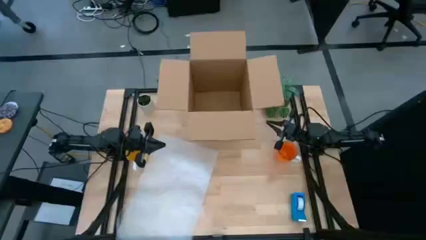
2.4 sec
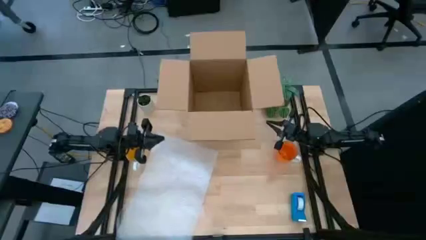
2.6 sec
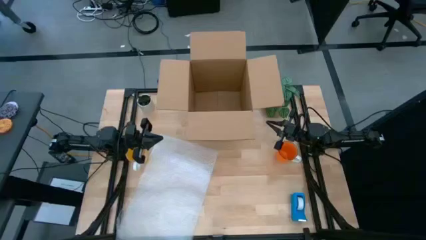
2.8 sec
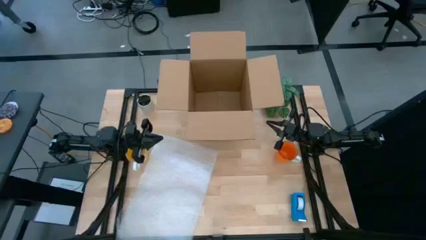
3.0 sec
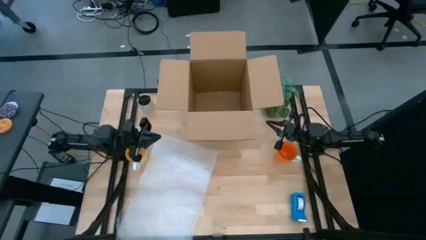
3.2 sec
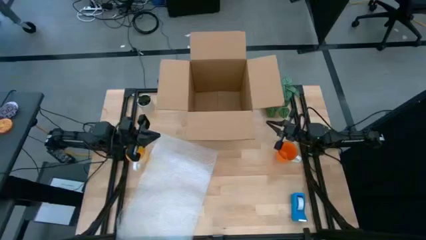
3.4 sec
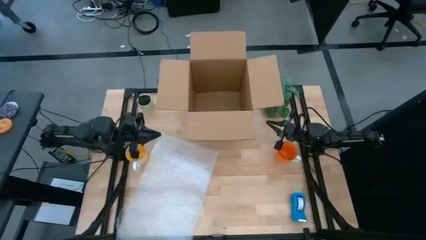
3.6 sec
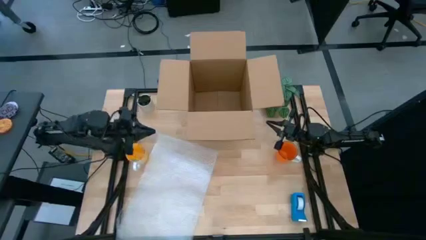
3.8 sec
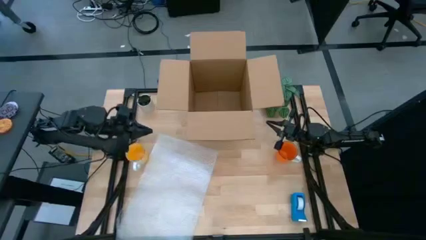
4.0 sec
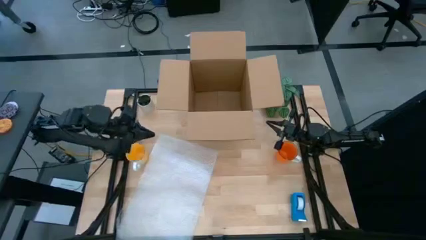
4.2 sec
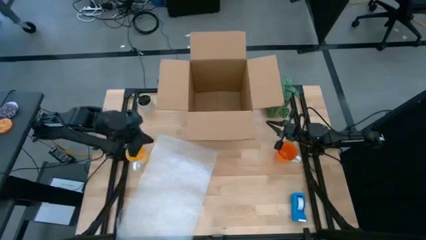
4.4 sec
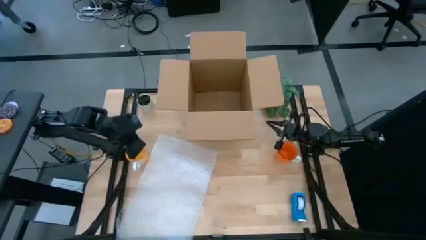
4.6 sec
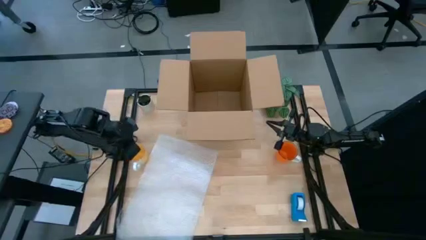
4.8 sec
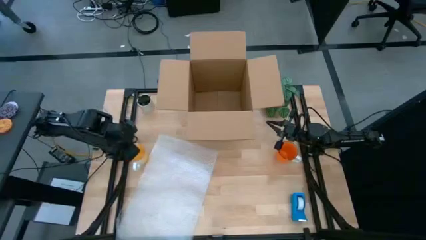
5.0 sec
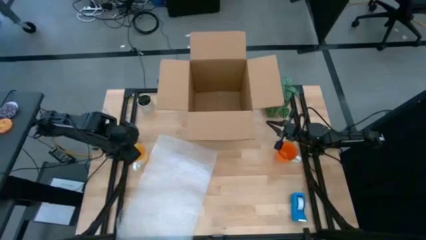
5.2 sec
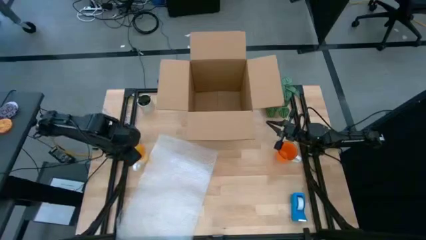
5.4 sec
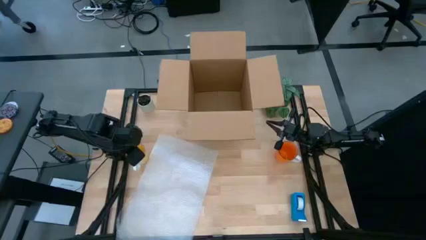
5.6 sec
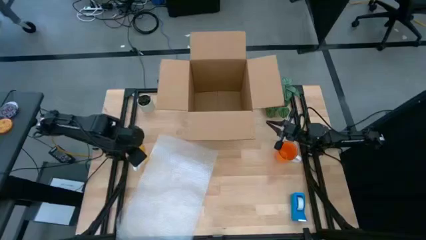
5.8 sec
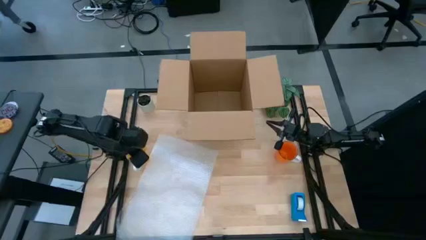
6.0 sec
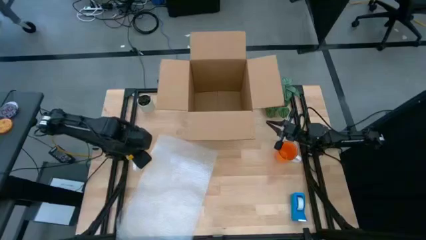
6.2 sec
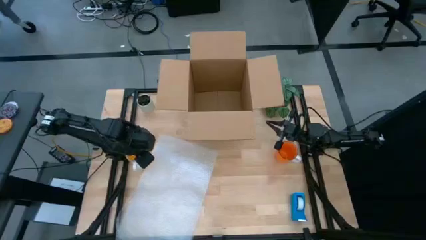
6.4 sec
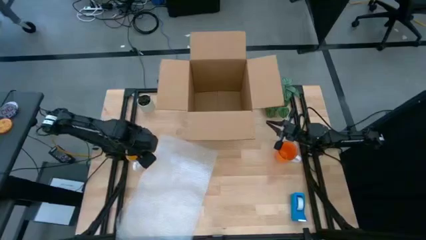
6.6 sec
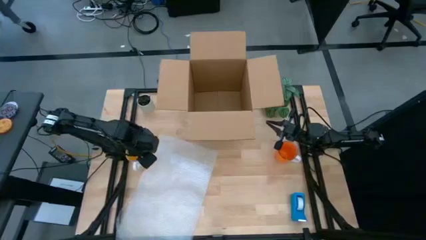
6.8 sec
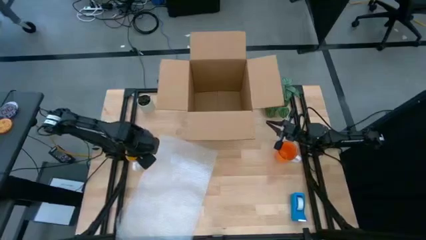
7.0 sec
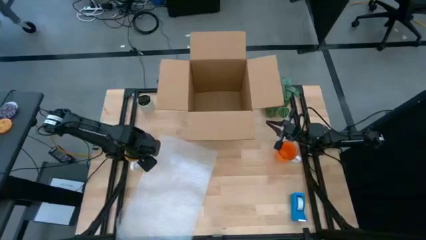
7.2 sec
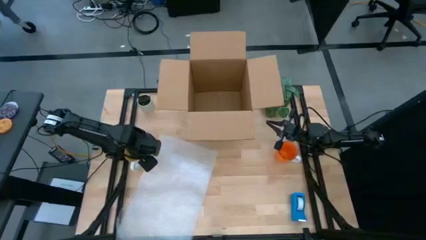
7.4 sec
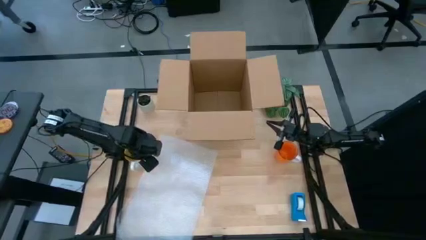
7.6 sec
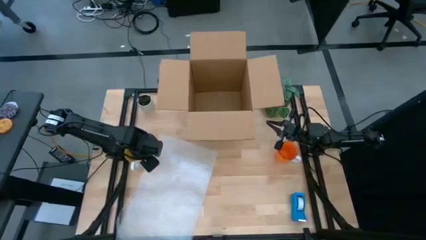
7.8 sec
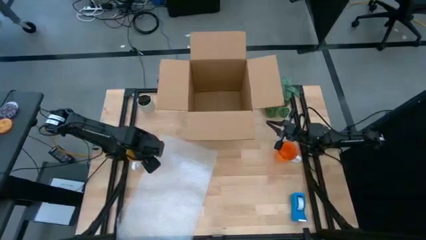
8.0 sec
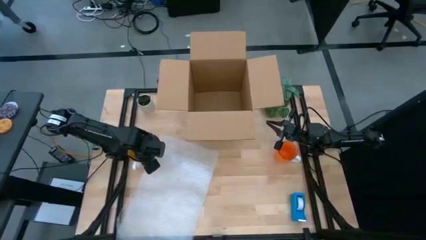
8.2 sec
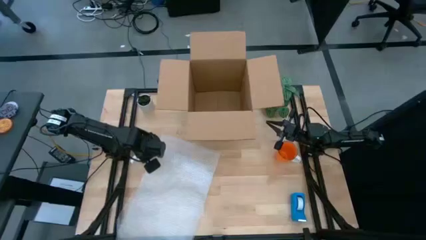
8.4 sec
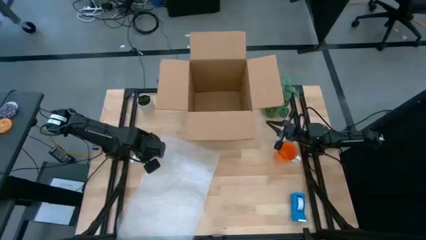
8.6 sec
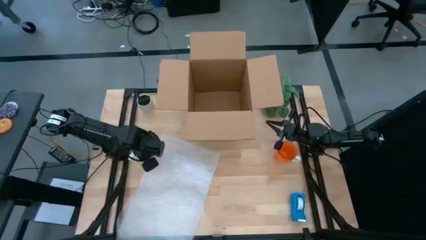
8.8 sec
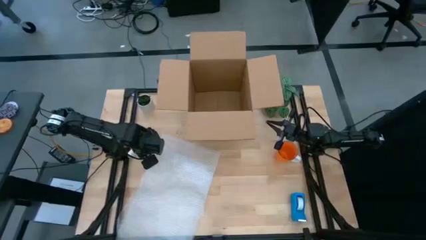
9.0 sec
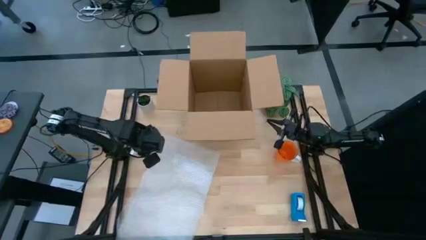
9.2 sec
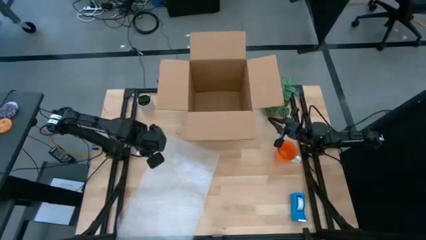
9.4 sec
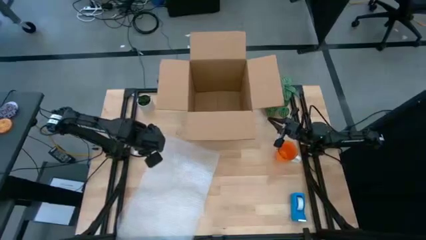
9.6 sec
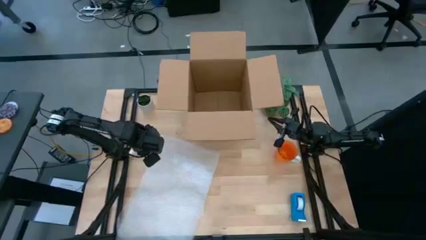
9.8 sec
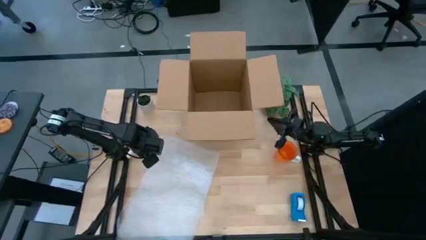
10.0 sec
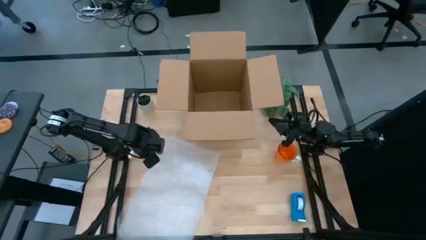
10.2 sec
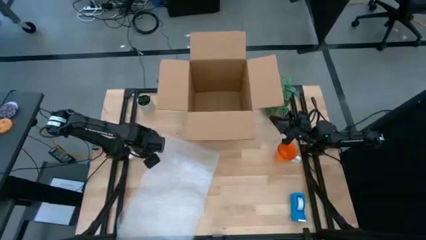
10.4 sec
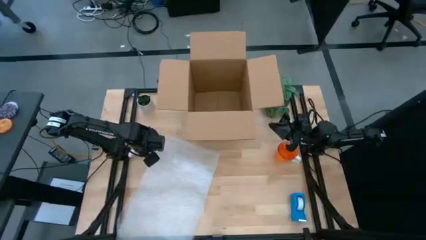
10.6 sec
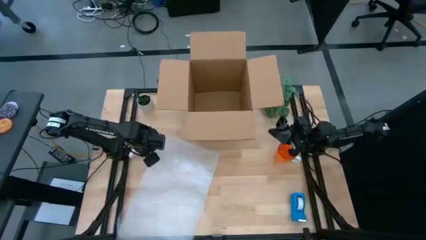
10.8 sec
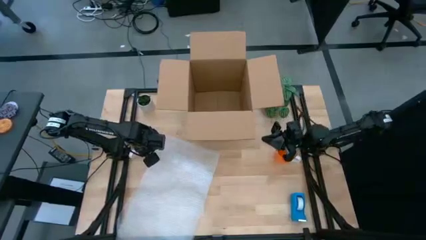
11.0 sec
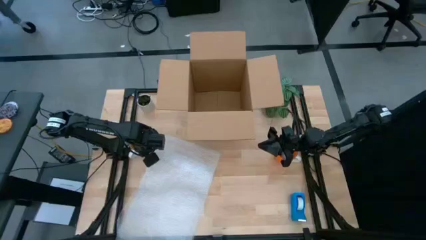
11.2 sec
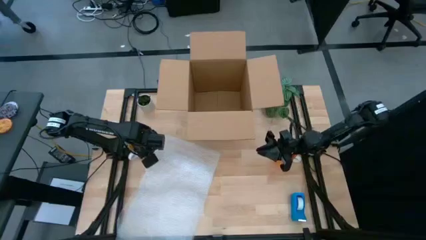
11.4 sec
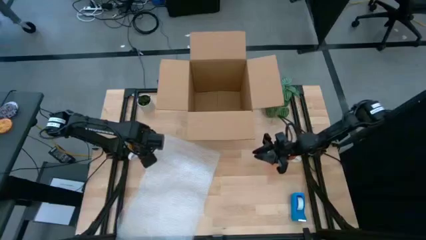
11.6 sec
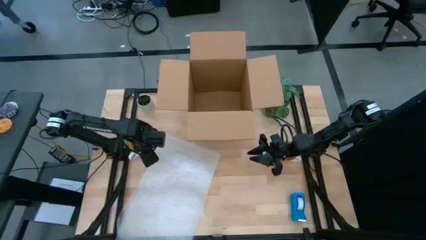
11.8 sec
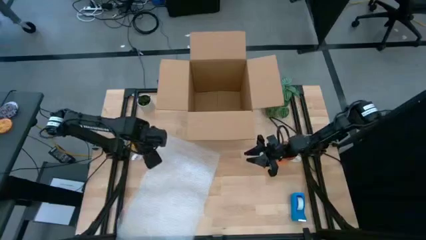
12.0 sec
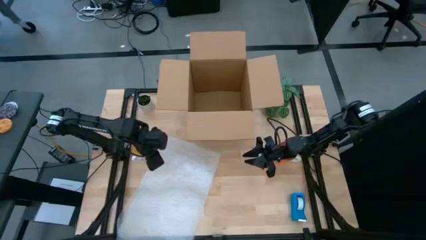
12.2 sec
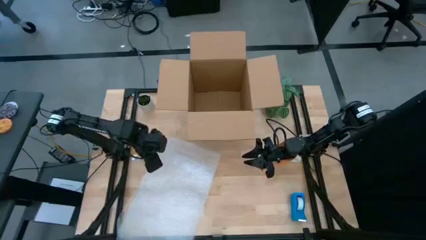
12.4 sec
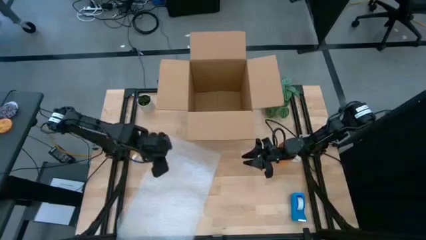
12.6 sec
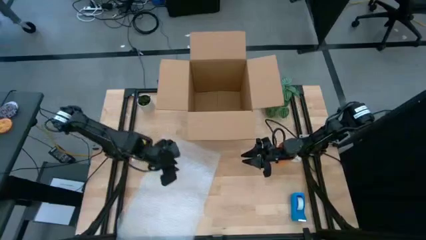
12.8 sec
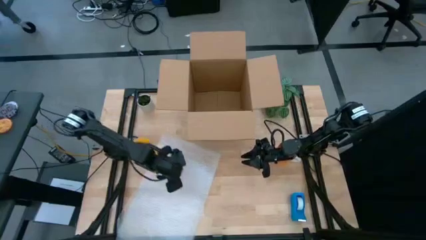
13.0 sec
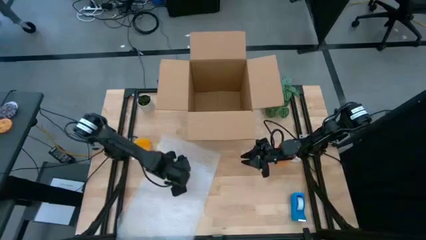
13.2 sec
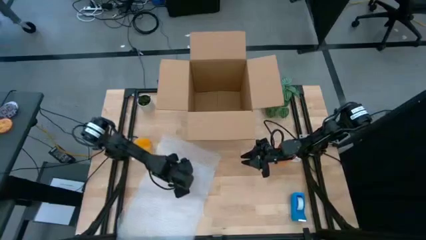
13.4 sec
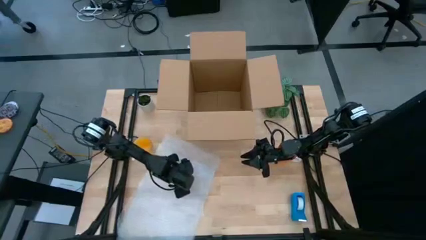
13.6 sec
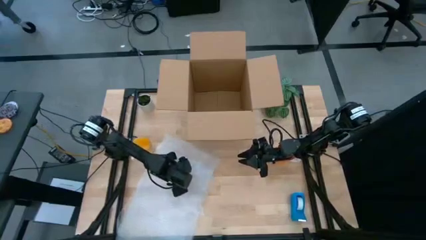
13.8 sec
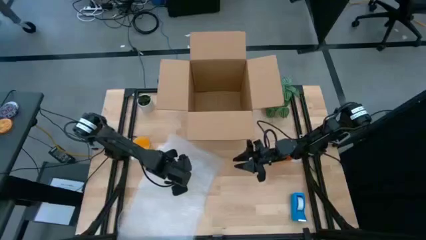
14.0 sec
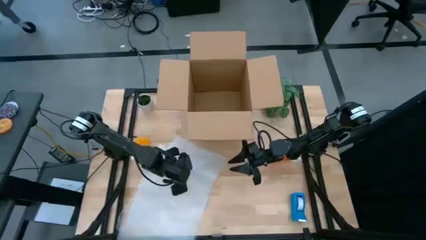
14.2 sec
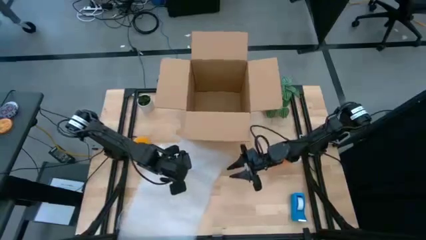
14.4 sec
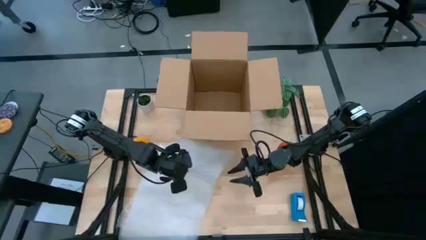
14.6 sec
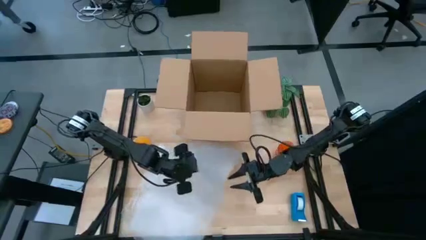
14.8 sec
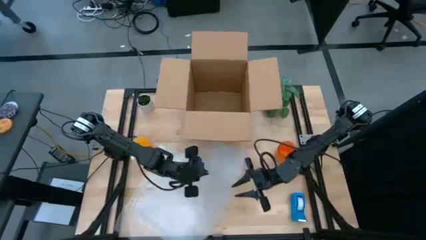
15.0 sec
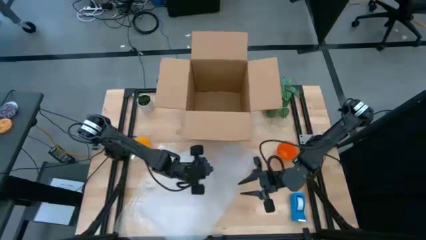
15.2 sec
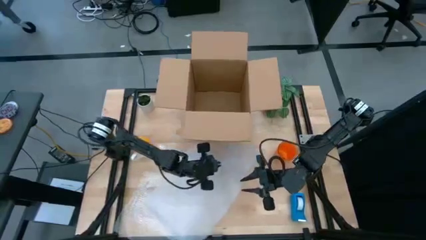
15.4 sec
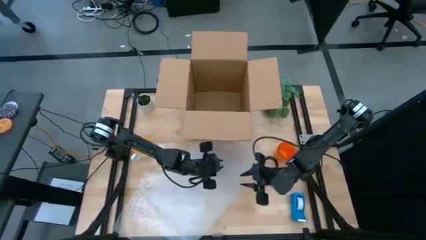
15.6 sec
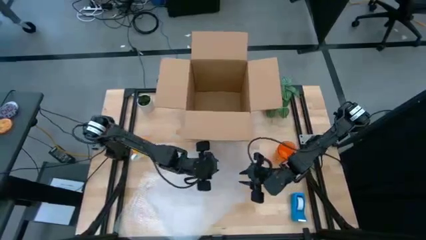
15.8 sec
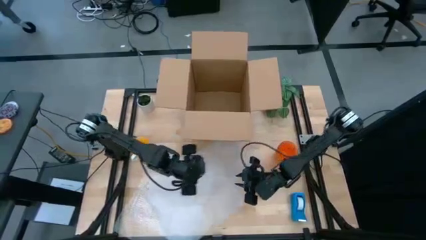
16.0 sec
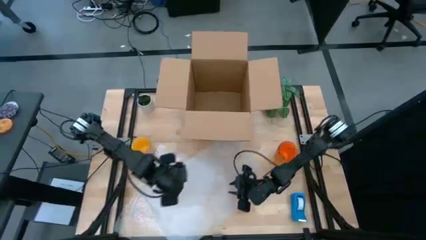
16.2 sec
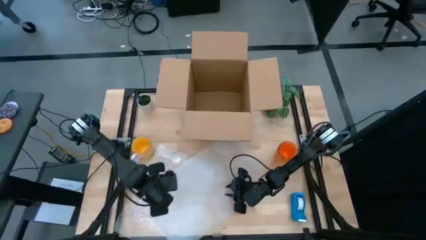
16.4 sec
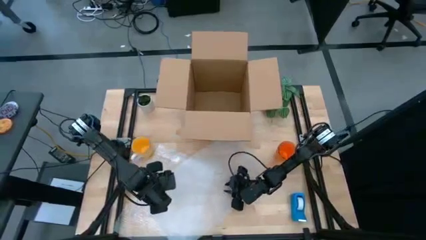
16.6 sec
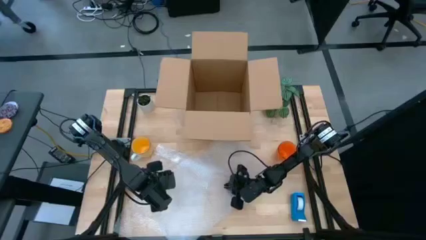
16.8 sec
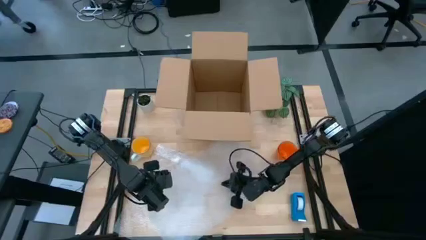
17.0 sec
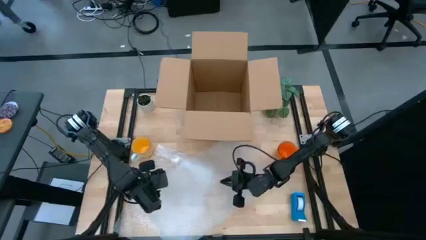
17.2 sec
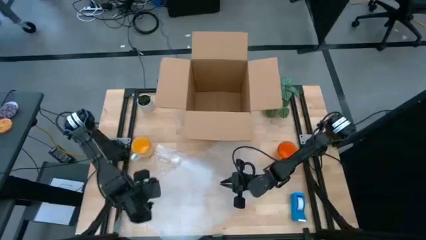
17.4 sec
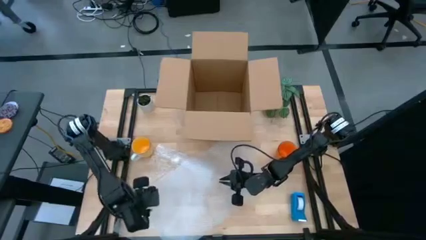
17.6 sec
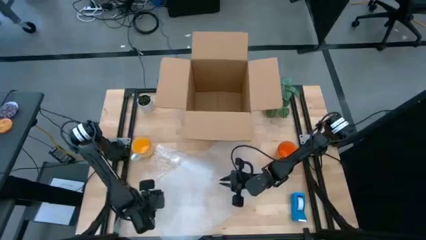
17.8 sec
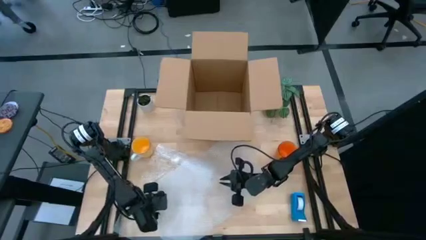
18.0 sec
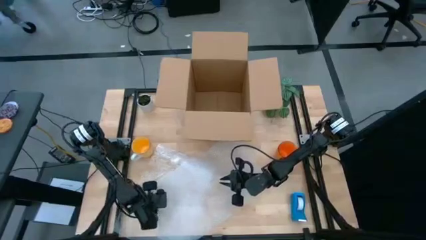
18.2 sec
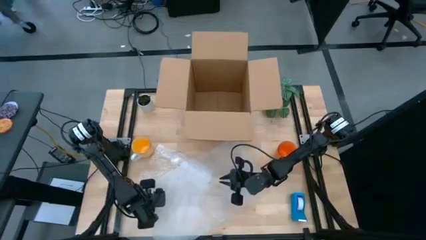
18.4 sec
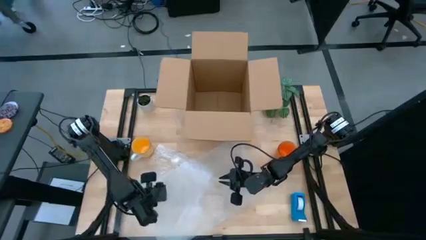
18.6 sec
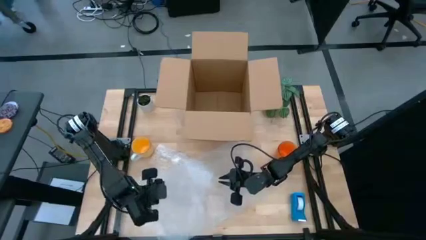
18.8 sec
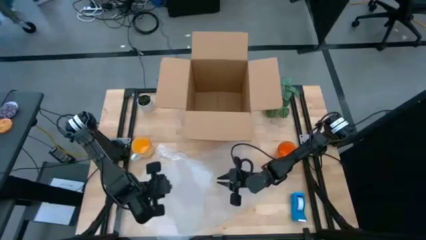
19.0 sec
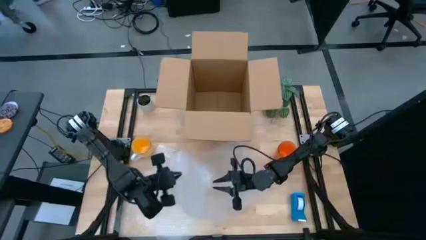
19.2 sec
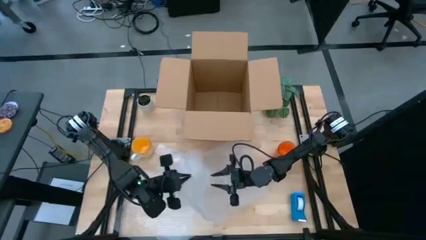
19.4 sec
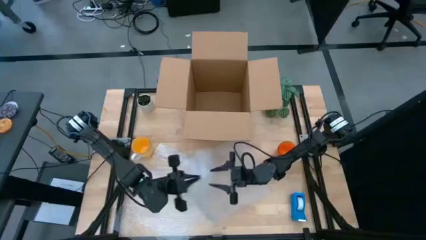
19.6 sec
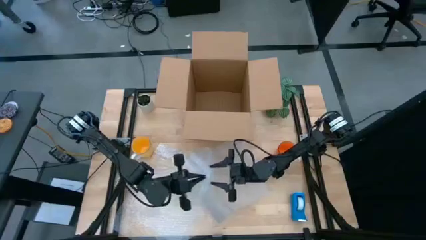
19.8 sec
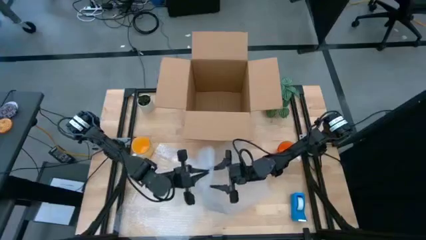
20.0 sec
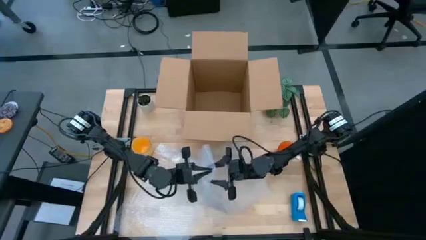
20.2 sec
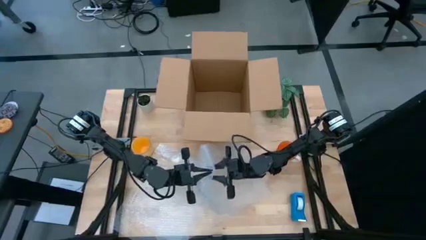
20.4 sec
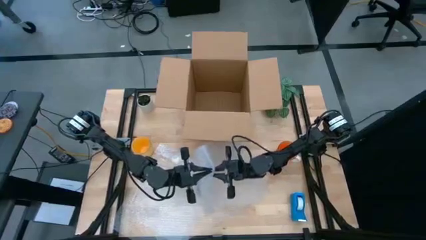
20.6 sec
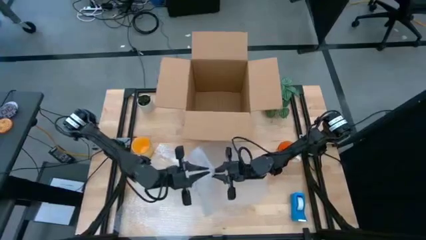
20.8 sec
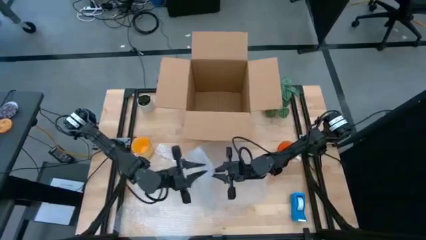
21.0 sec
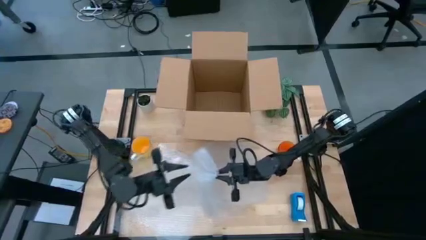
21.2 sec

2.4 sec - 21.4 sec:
Task: wrap mug
Wrap the orange mug with the bubble wrap
